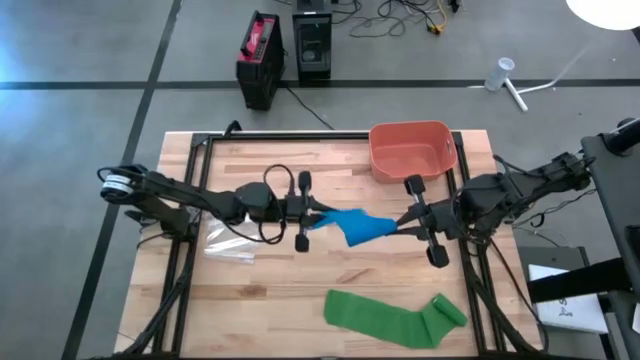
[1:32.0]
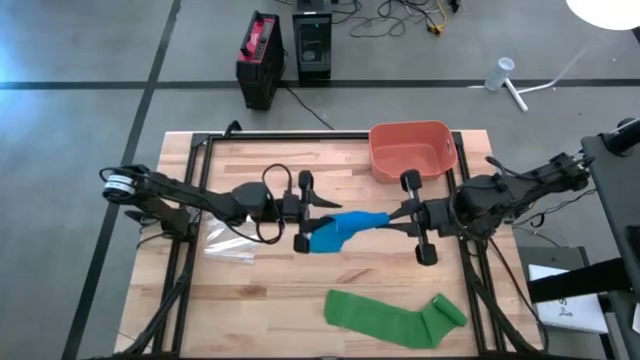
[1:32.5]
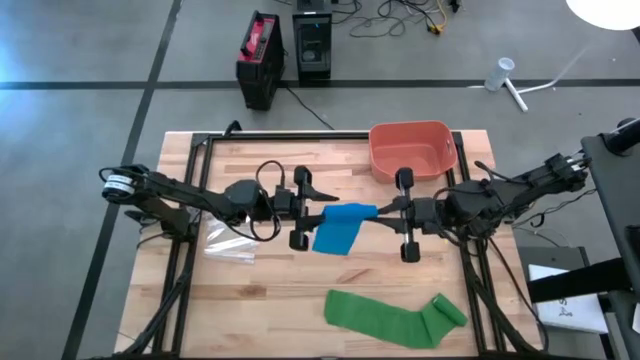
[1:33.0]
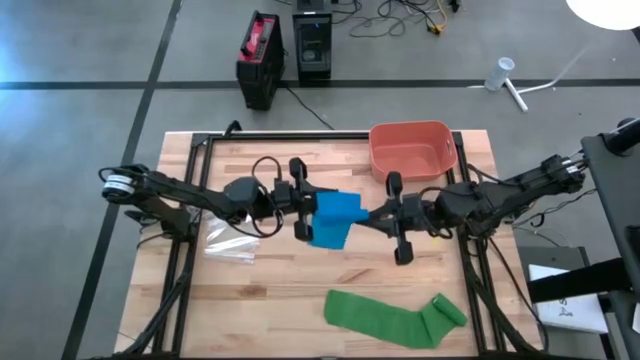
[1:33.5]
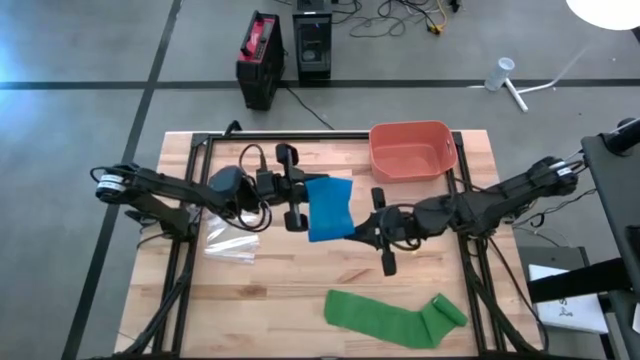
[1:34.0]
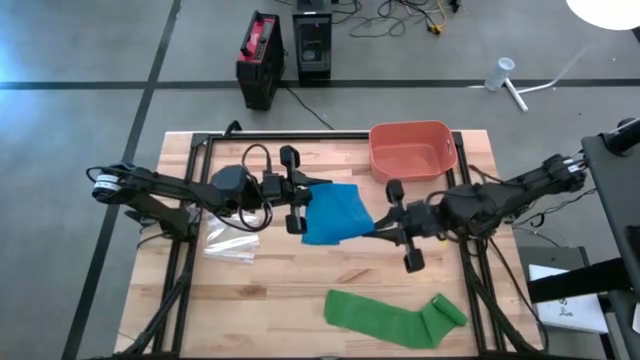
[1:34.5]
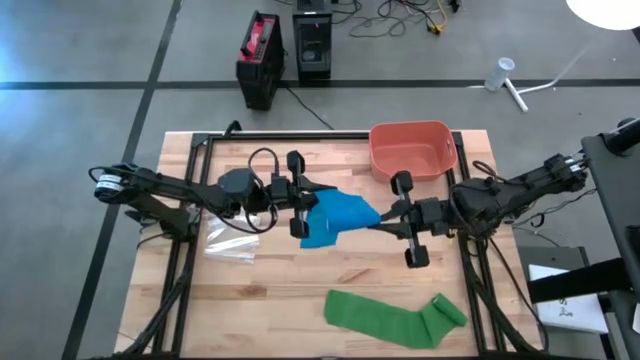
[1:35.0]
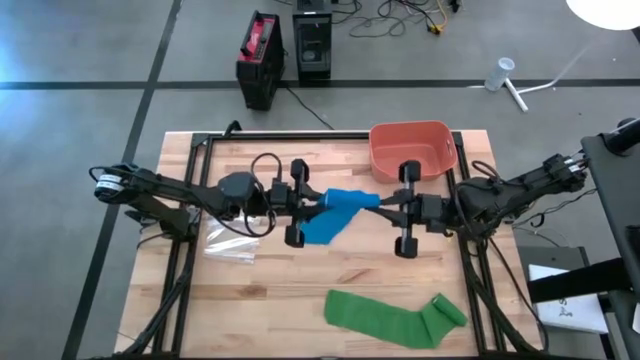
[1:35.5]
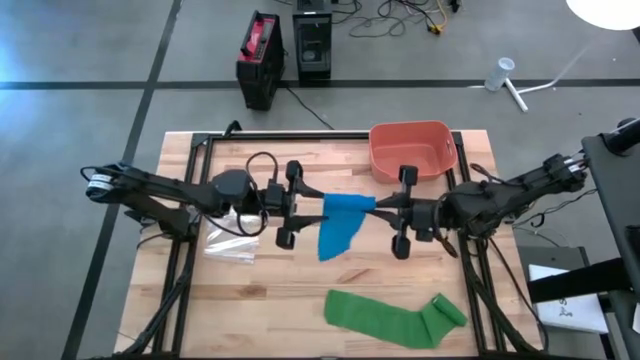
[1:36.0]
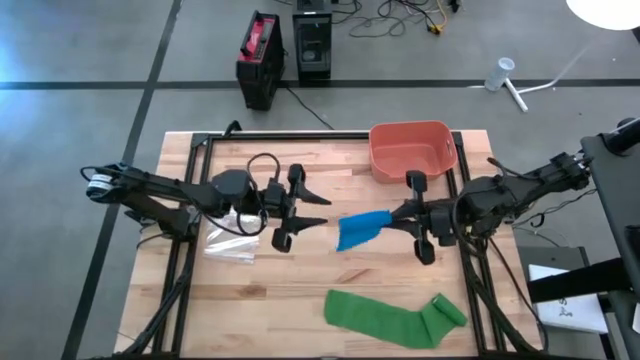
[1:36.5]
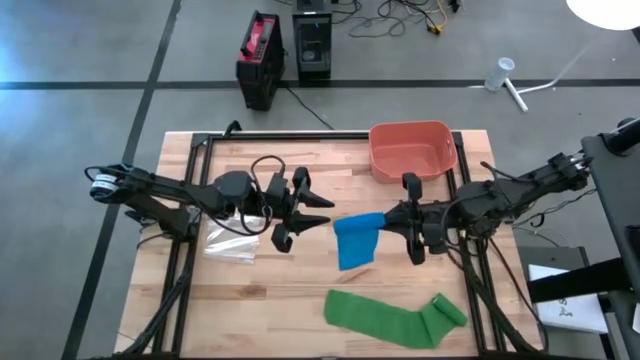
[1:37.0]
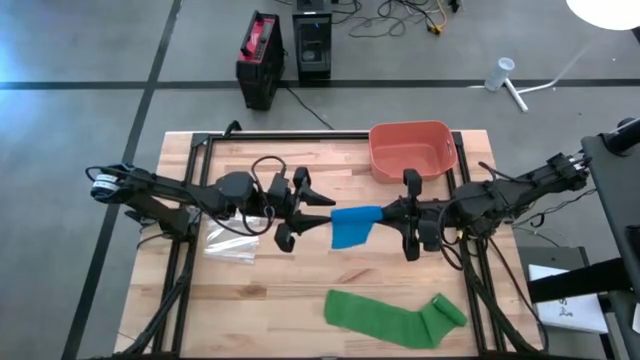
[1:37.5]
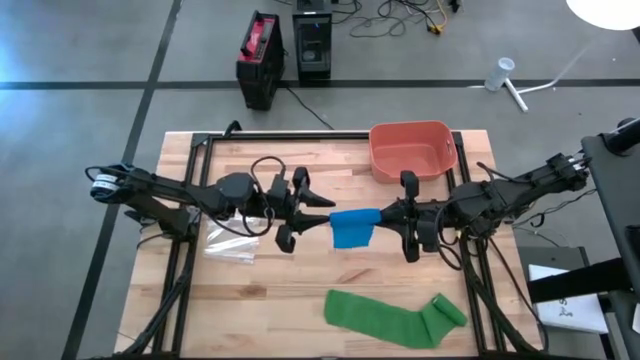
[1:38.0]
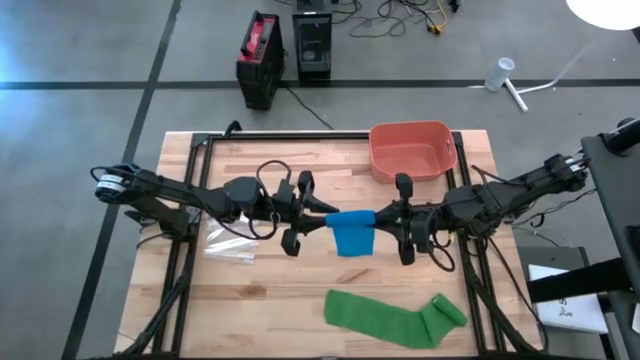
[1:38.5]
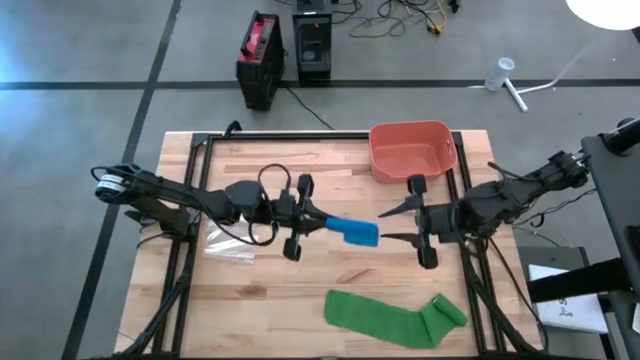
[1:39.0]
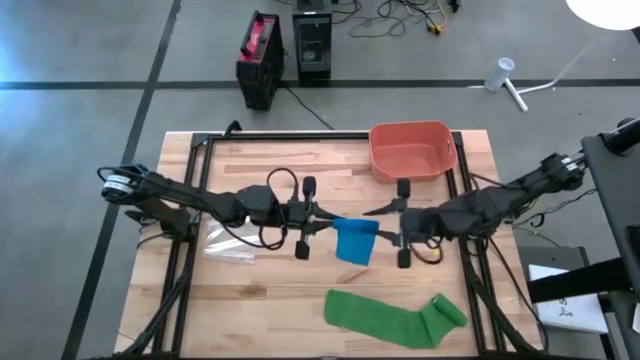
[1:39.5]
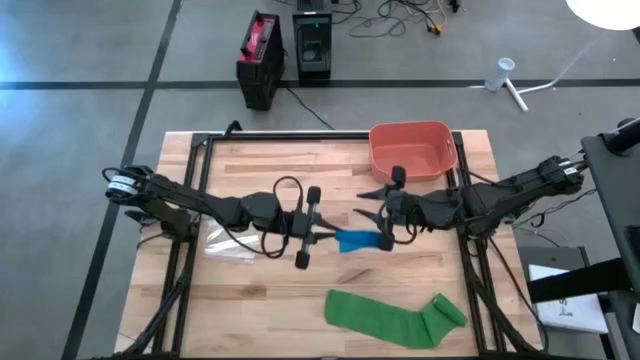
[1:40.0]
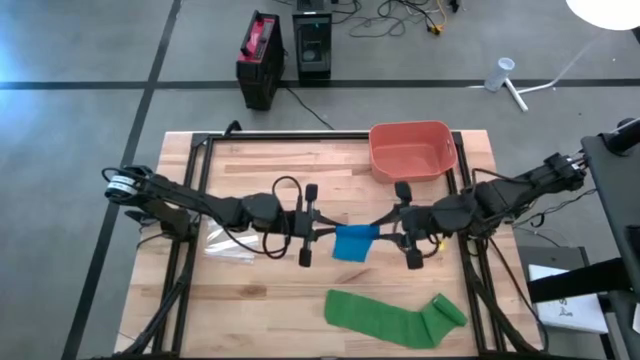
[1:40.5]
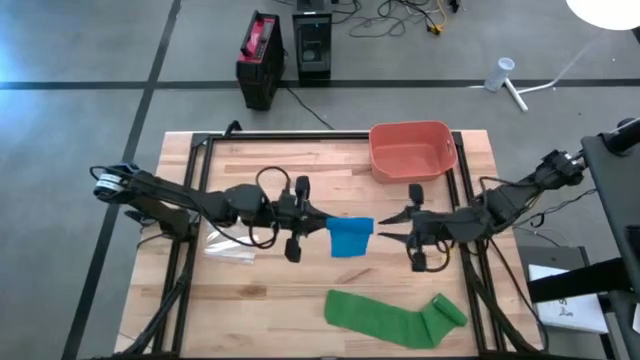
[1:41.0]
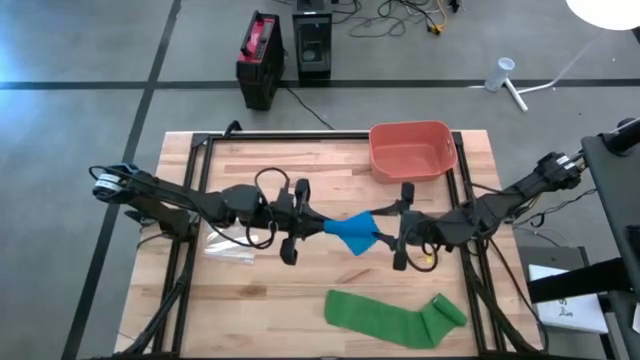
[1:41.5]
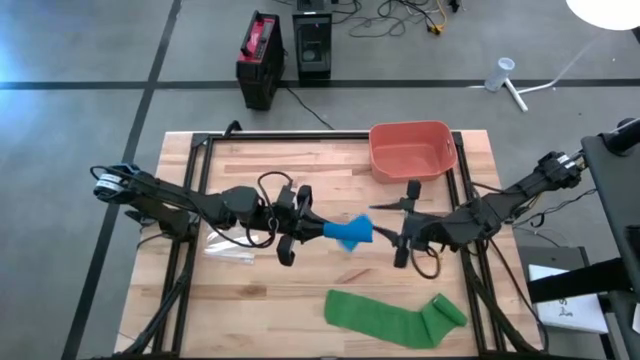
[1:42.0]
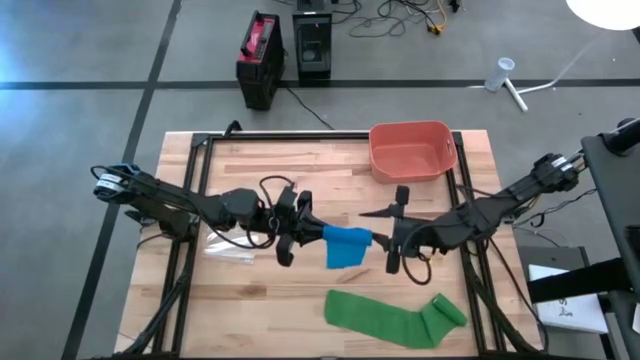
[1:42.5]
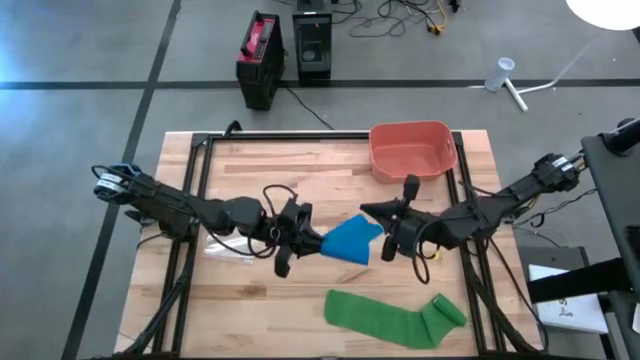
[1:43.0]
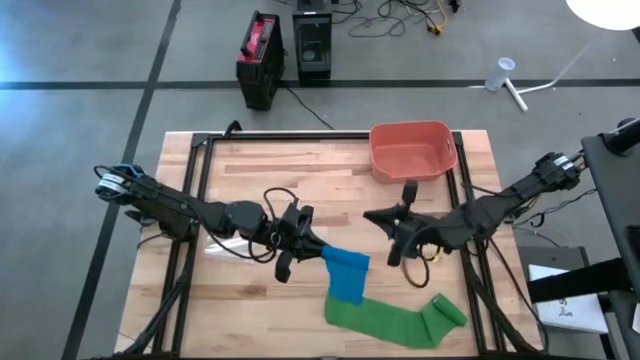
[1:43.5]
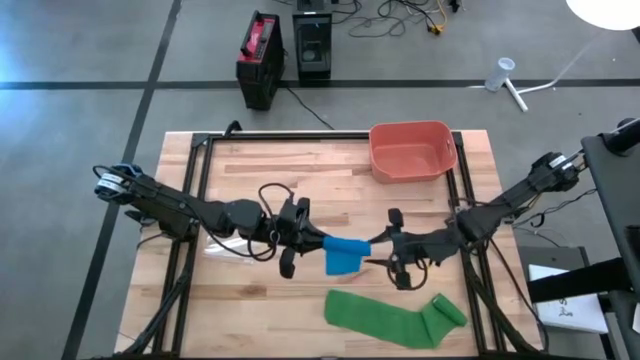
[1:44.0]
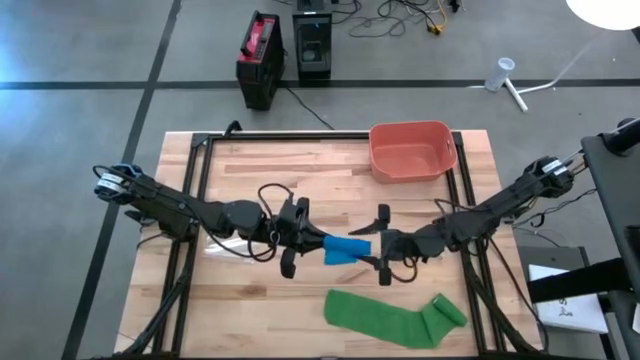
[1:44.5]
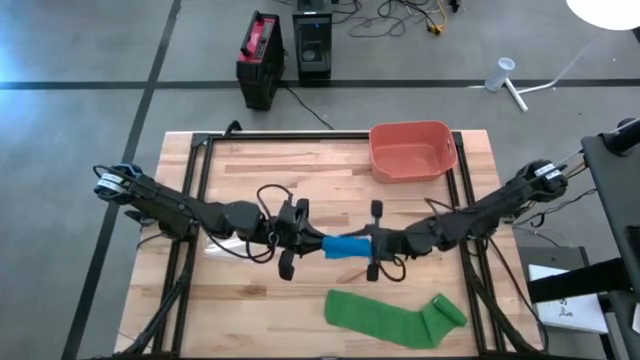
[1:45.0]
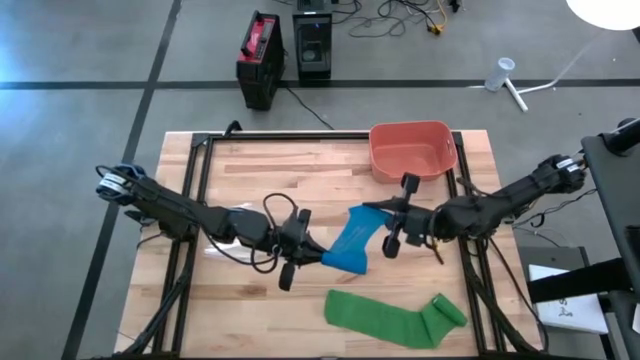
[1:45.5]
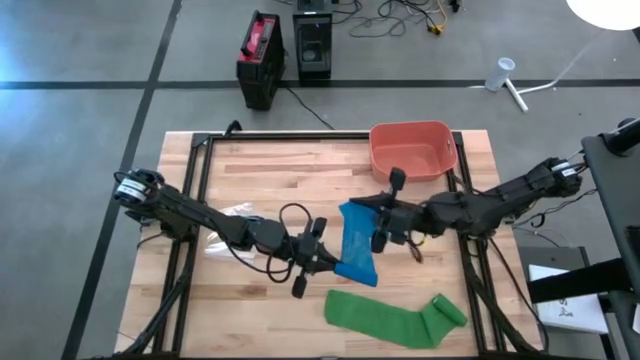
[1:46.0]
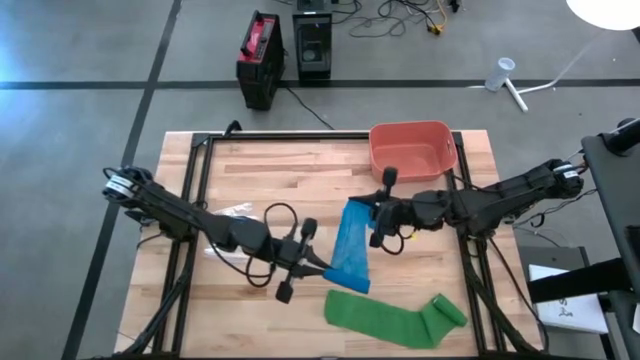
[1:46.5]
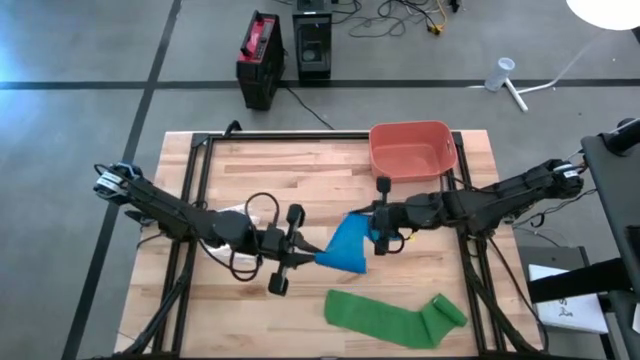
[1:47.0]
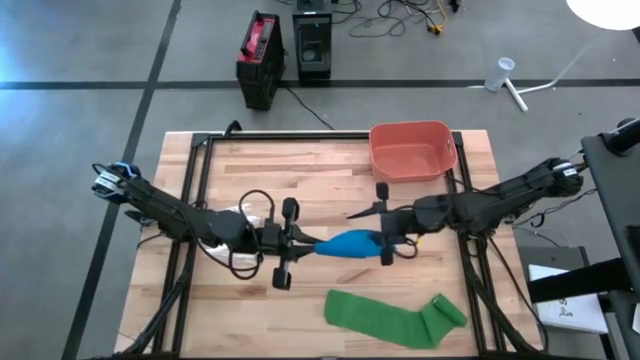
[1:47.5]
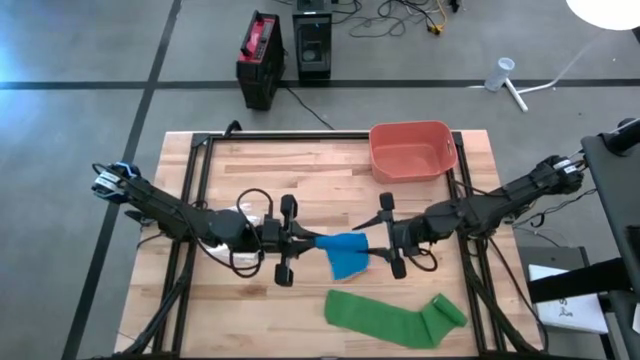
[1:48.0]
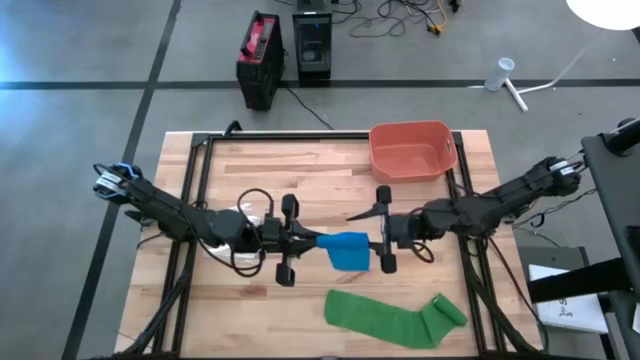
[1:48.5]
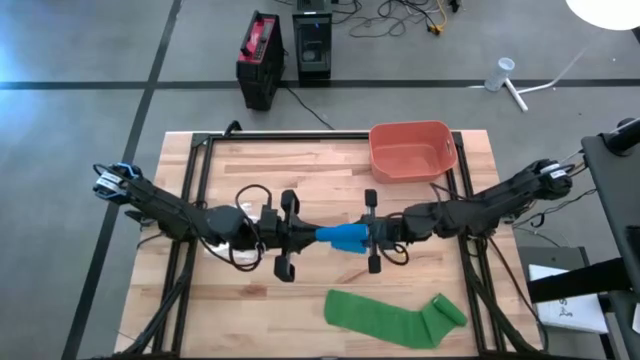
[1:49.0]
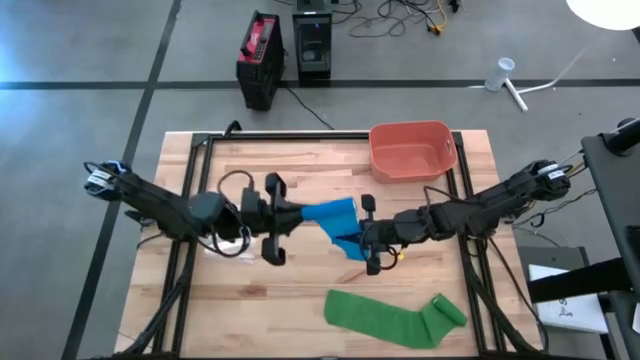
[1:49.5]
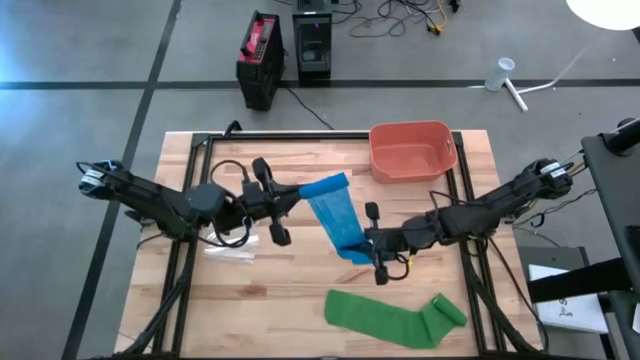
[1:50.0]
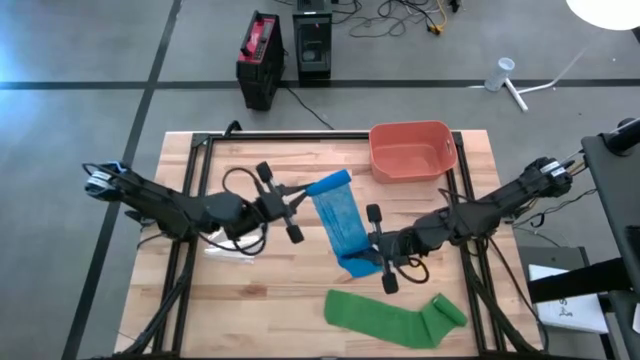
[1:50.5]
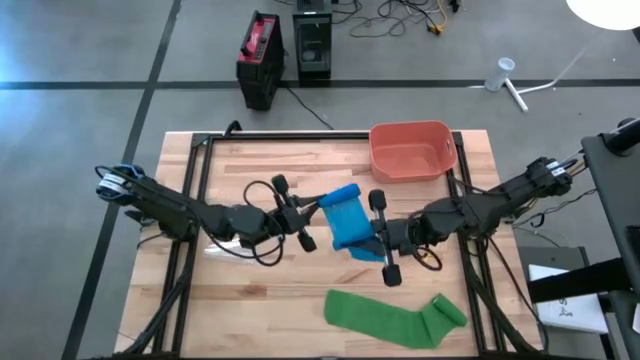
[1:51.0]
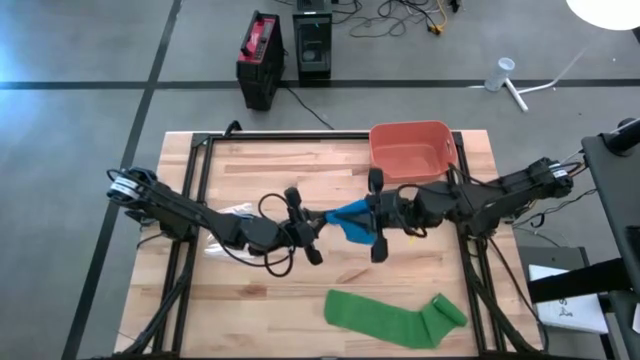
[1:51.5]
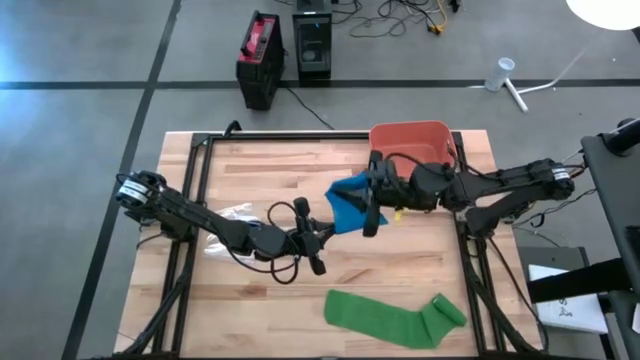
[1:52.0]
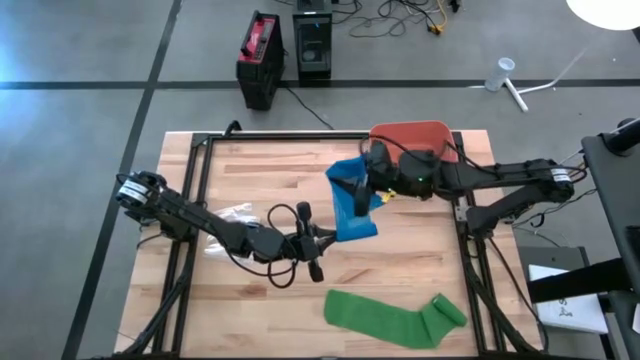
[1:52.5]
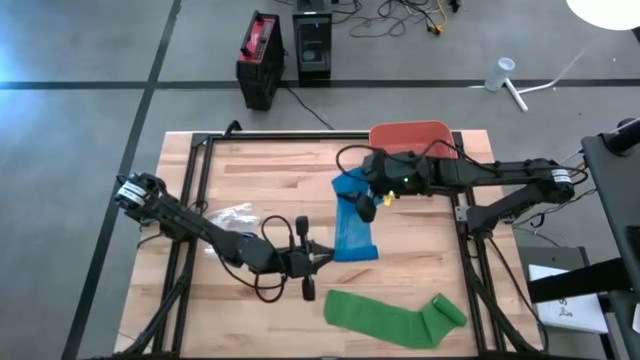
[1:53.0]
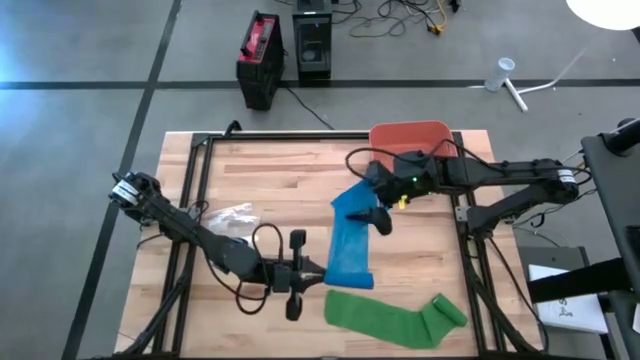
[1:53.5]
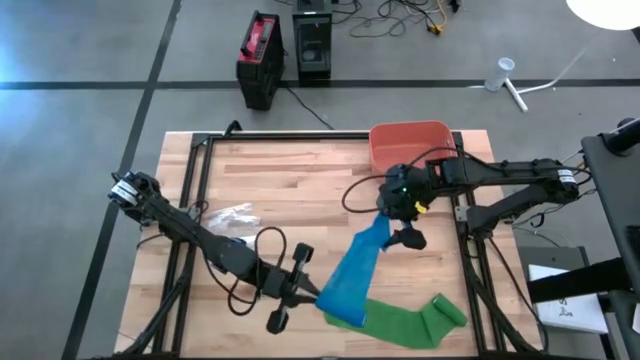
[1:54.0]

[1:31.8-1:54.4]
Task: Roll bandage
Roll the blue bandage
